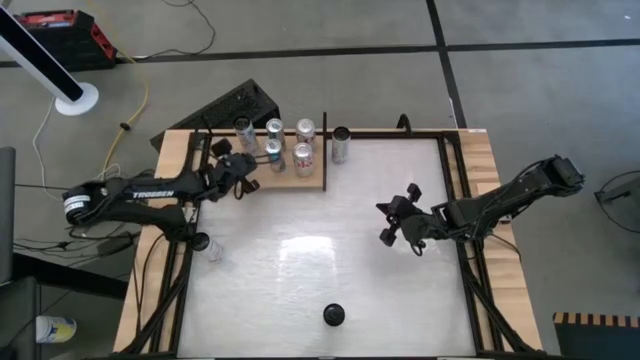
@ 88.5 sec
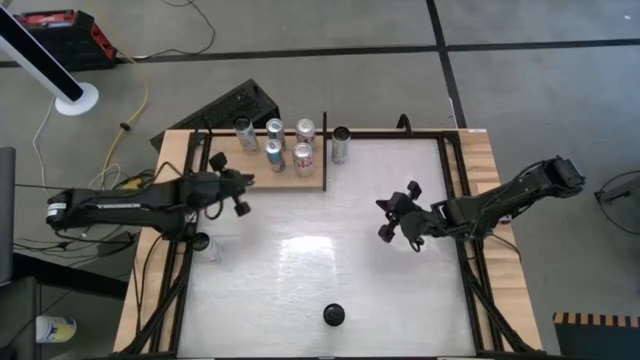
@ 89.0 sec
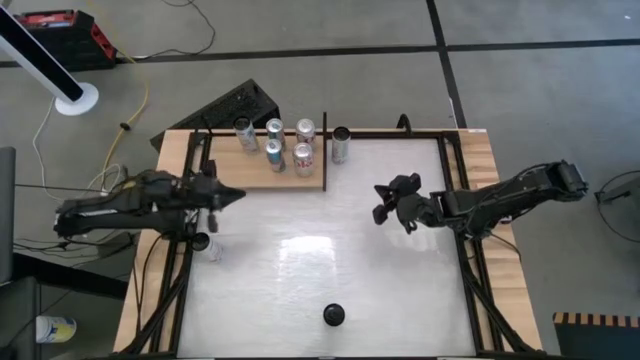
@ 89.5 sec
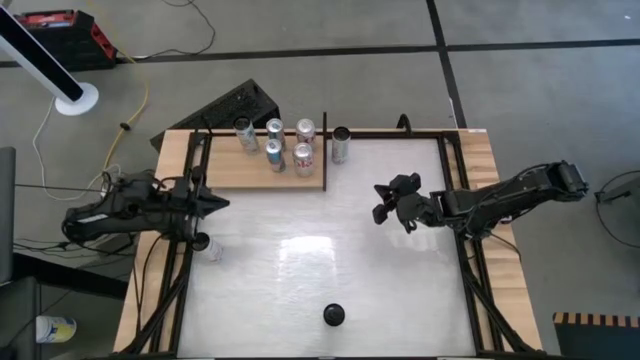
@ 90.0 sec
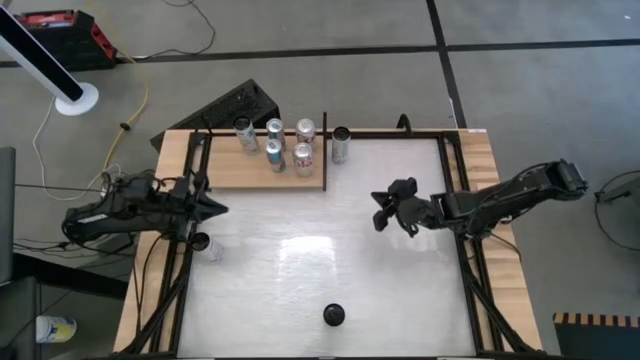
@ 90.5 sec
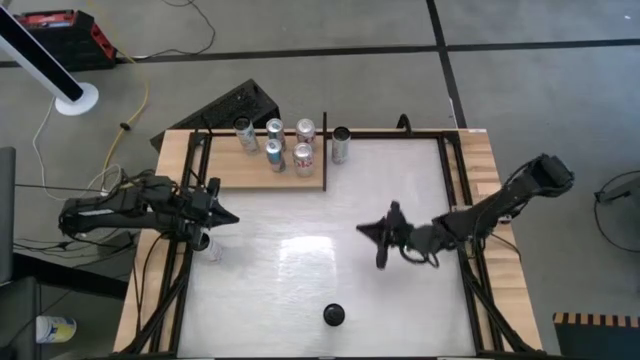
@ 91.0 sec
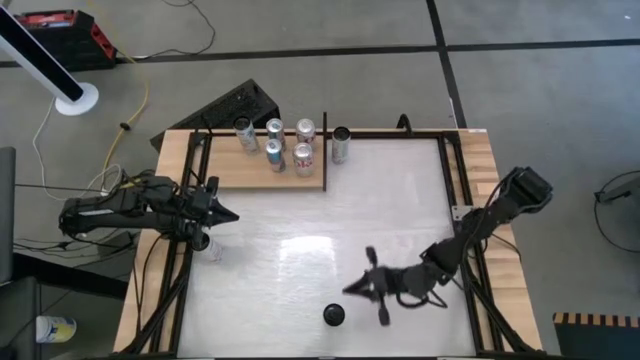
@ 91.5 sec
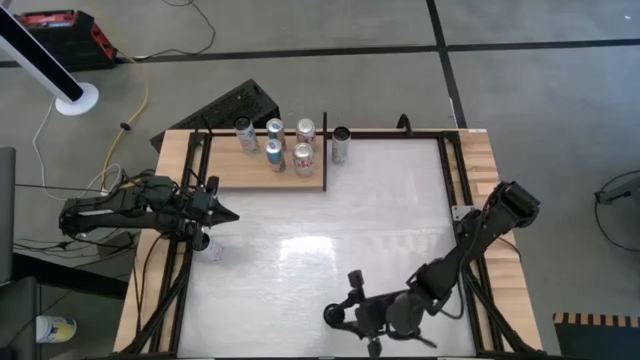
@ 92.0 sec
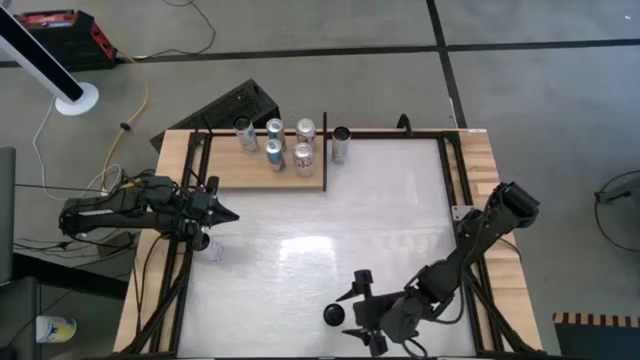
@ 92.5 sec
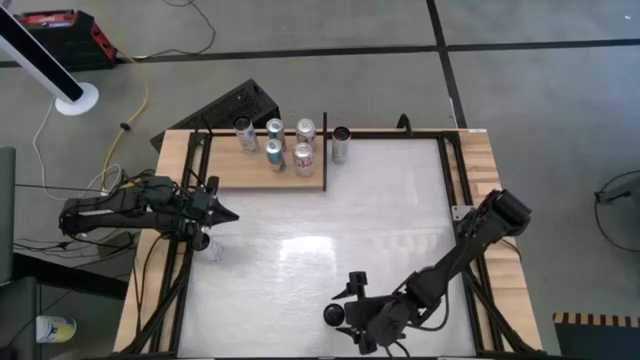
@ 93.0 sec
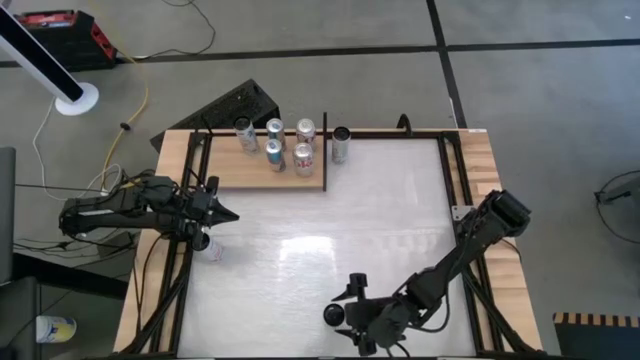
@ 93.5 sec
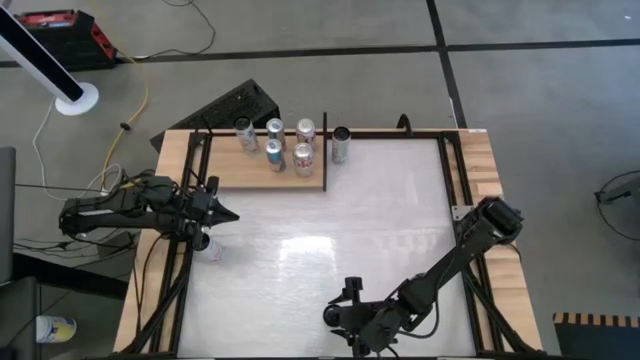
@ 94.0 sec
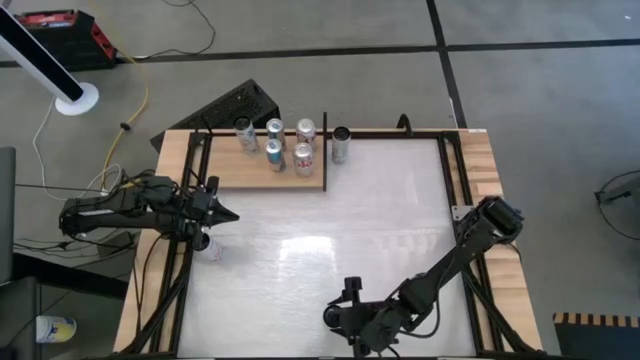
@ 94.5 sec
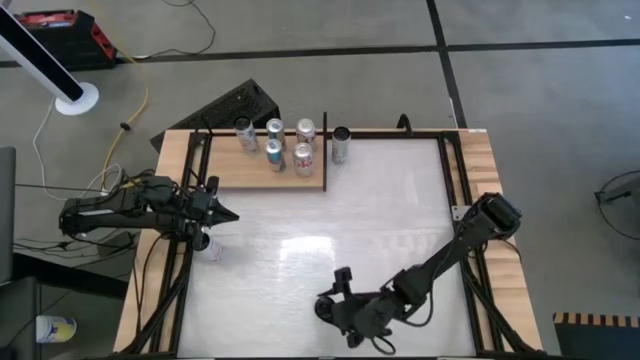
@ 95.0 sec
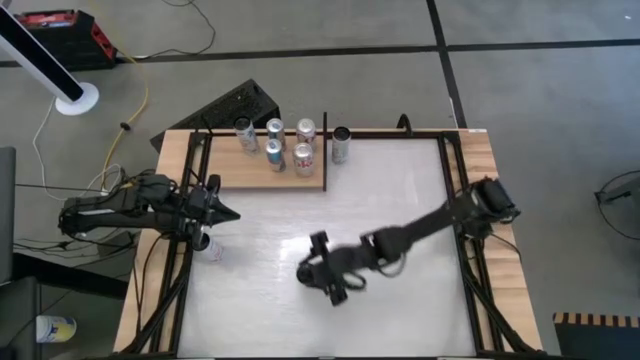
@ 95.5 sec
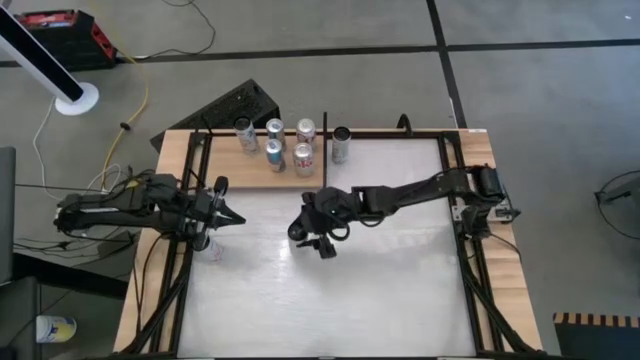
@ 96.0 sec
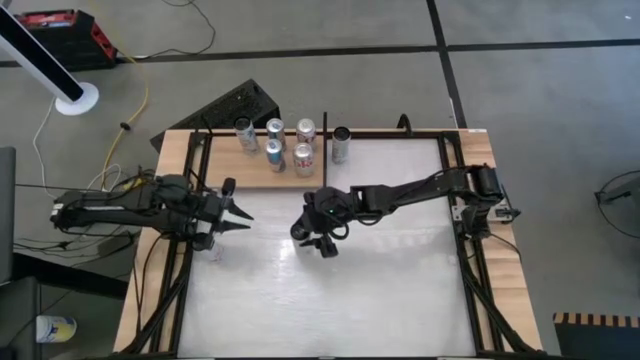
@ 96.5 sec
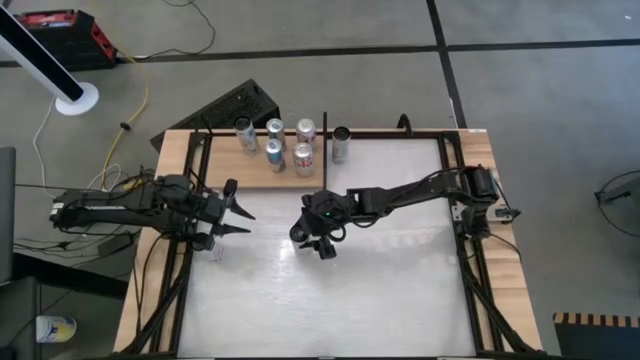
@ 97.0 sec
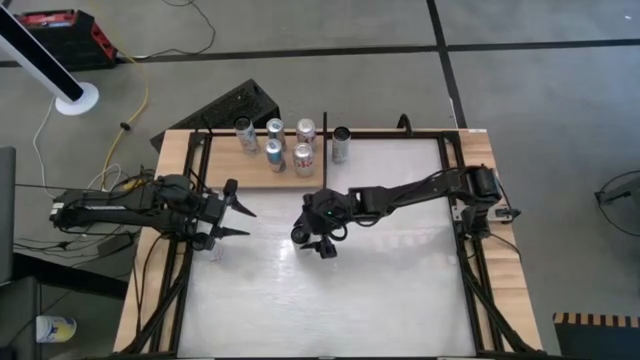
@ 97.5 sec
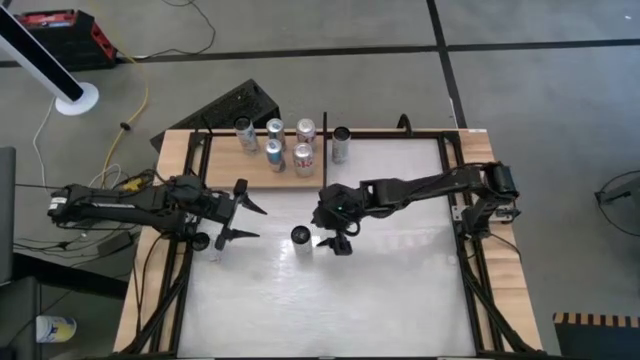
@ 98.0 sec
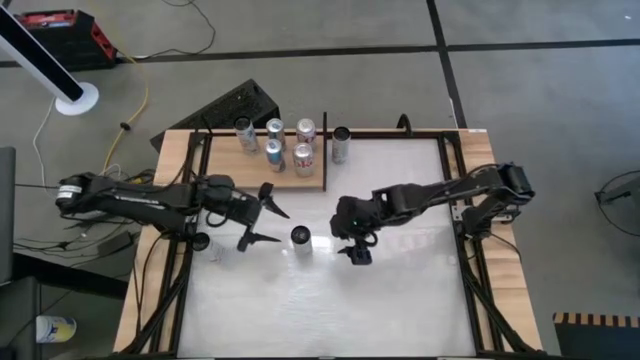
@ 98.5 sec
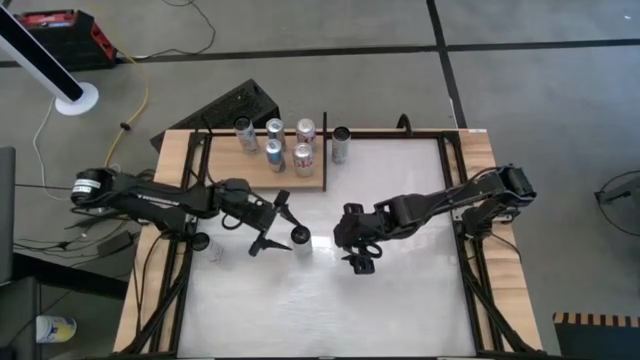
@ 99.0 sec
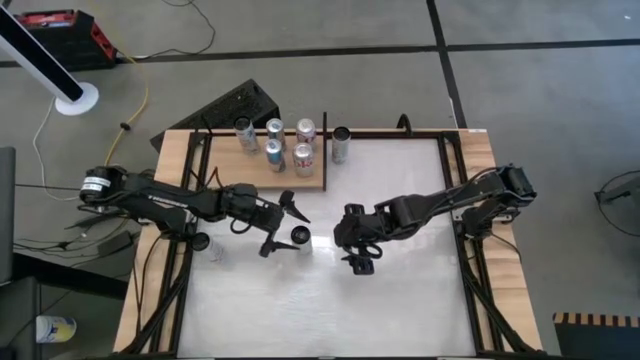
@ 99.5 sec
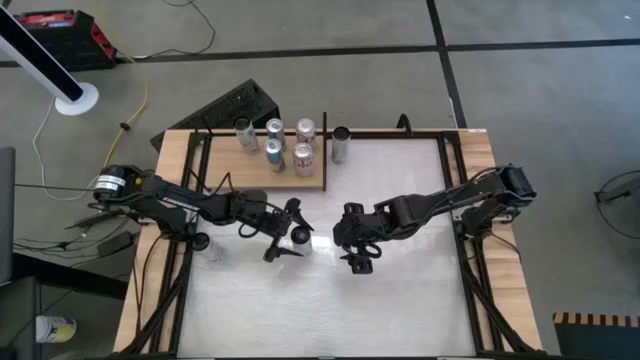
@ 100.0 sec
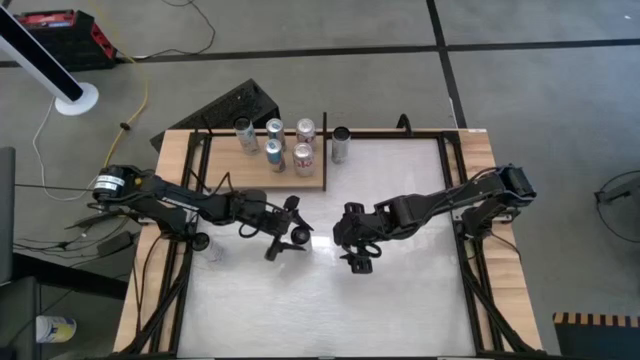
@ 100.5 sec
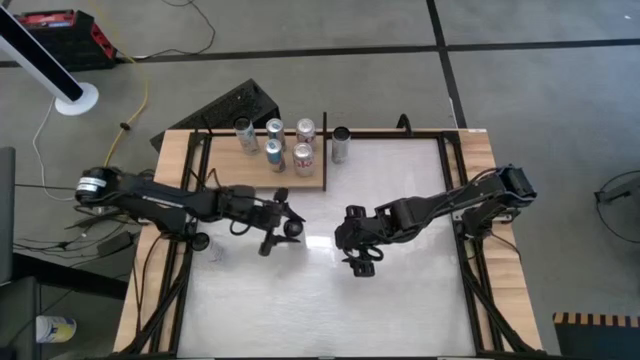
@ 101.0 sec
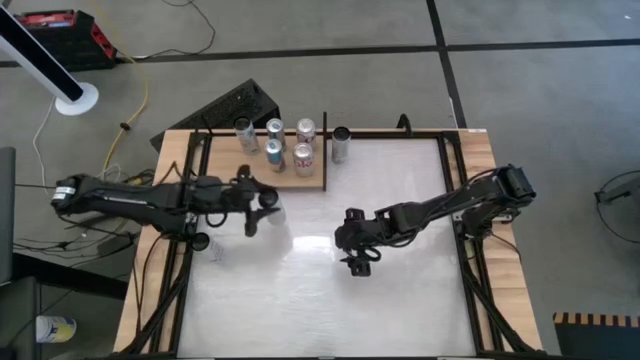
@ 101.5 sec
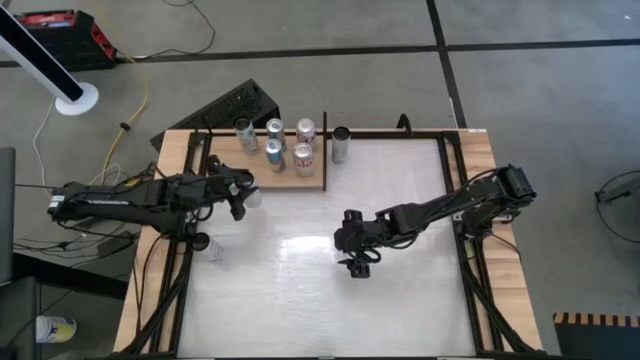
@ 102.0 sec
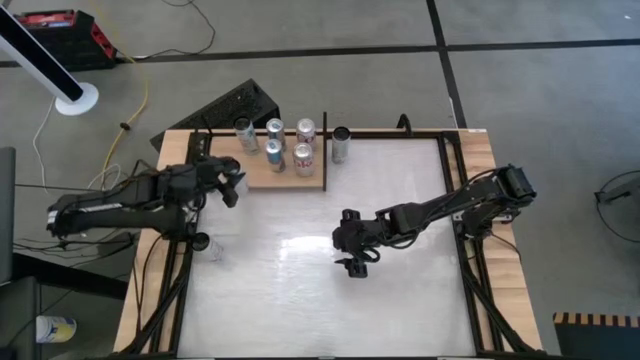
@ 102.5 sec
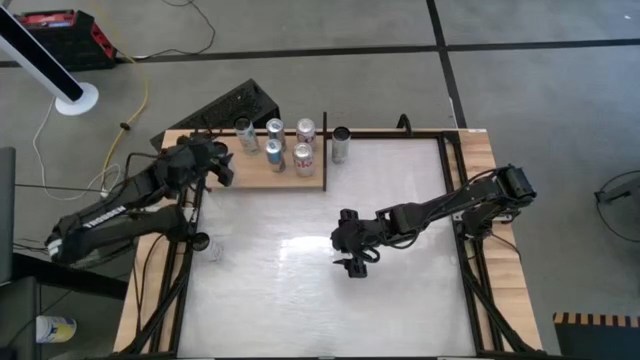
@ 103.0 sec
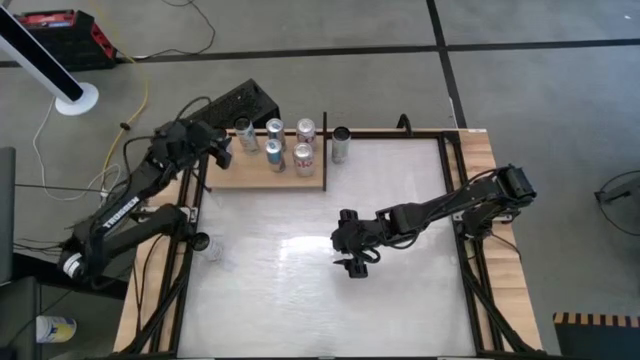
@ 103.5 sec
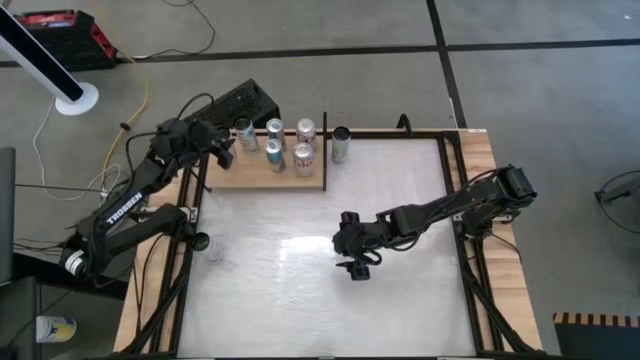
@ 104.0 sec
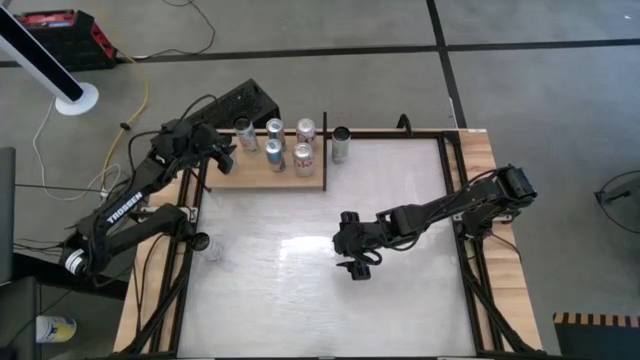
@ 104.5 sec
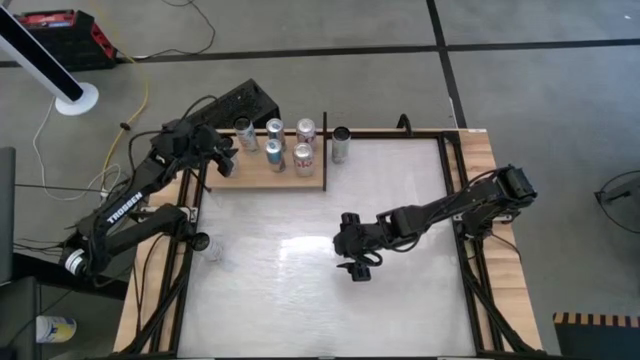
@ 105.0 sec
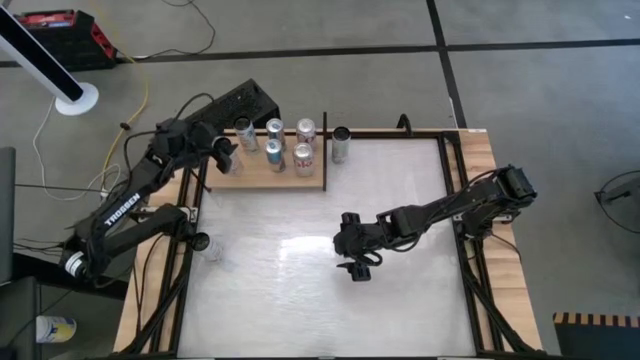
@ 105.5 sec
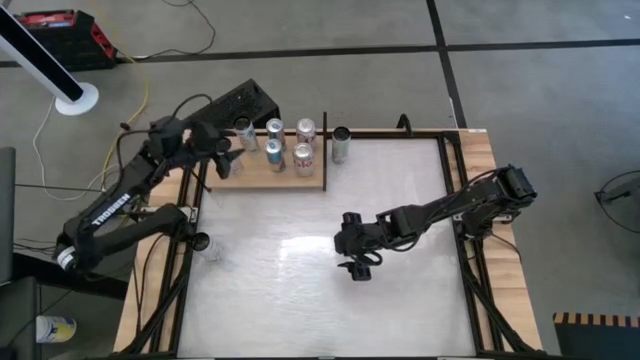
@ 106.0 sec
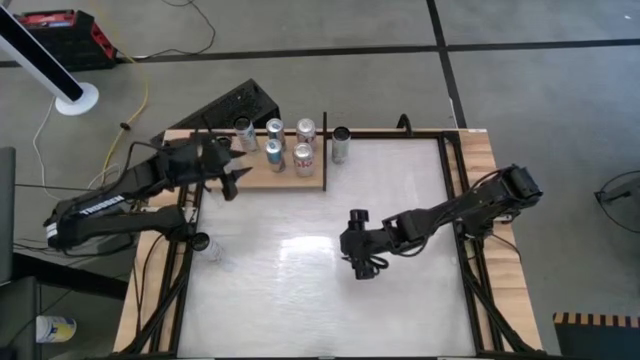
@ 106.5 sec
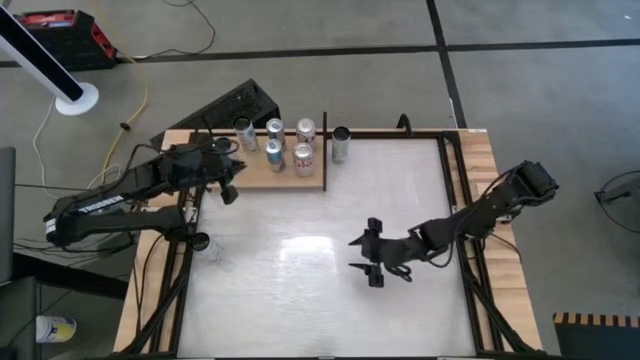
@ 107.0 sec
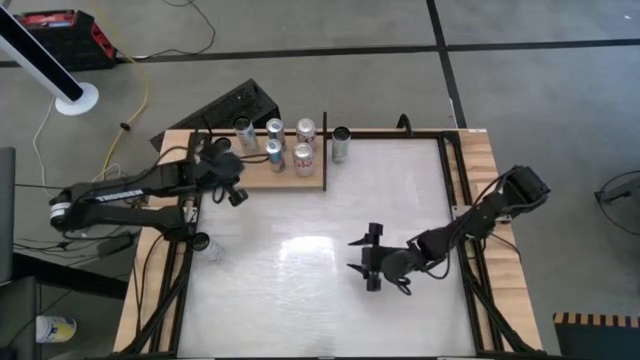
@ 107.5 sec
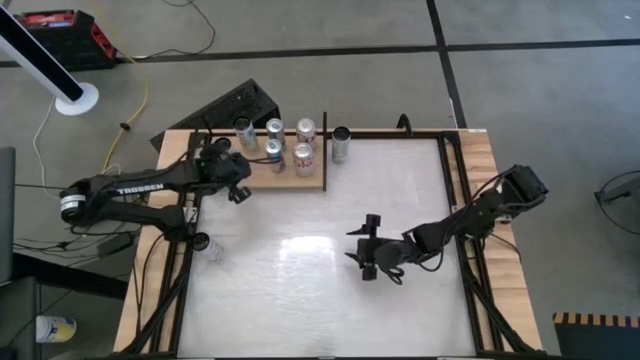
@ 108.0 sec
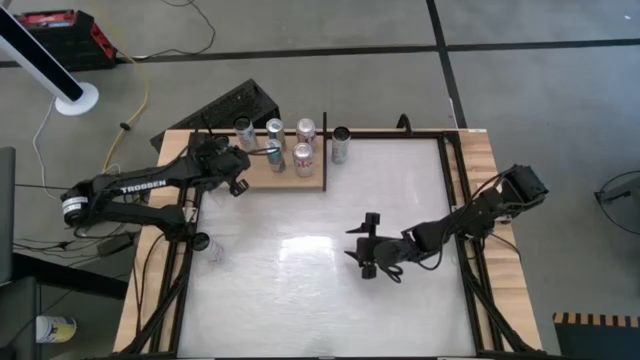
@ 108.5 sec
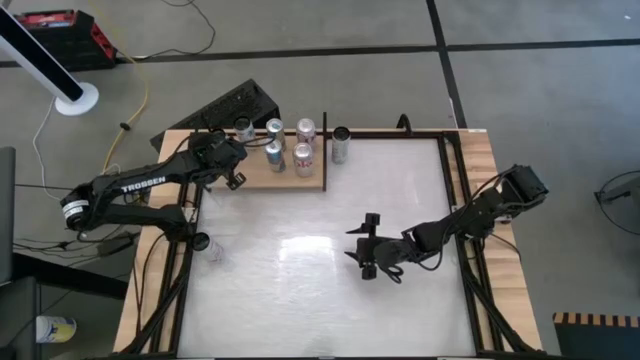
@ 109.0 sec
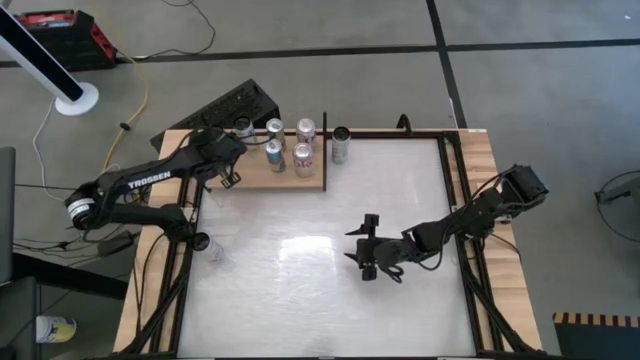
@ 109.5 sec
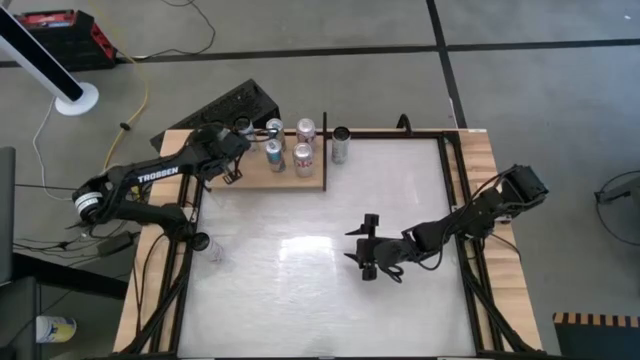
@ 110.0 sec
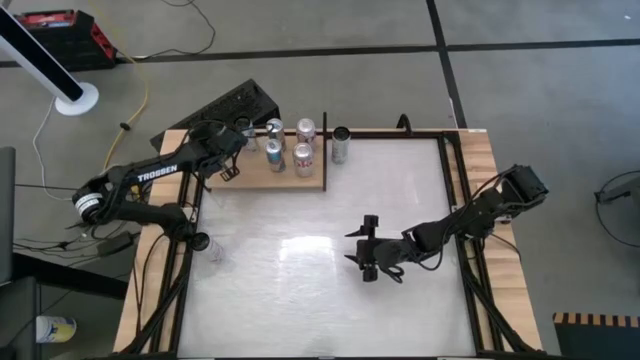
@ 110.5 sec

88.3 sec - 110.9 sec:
Task: Place canned beverage on shelf
Put the bottom white-yellow soda can on the shelf
